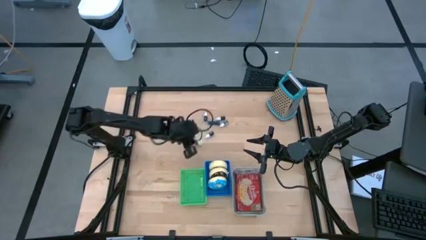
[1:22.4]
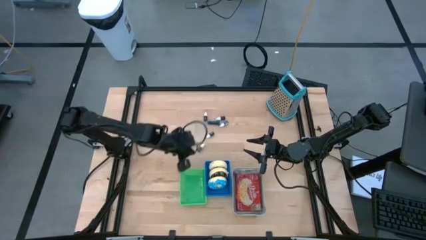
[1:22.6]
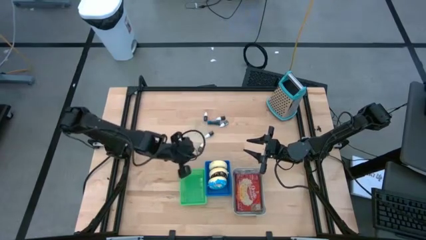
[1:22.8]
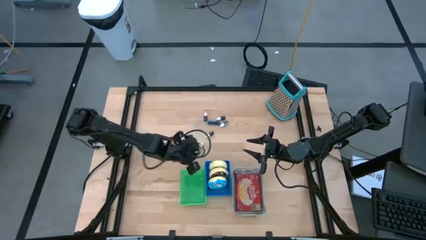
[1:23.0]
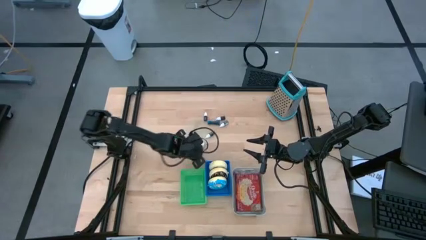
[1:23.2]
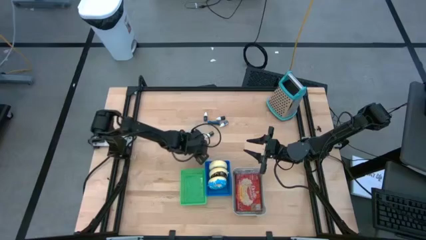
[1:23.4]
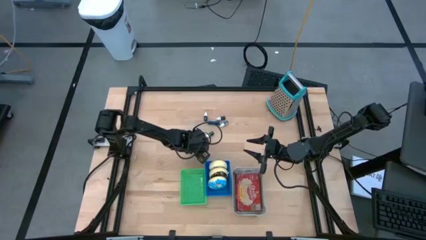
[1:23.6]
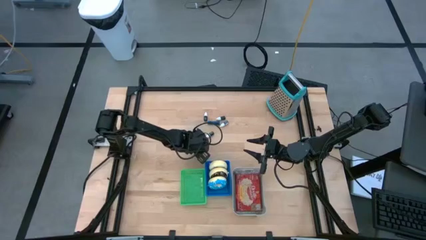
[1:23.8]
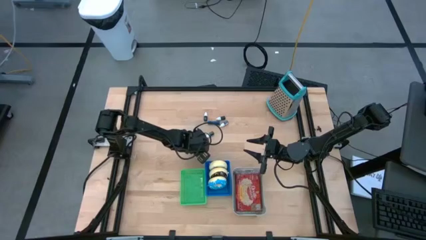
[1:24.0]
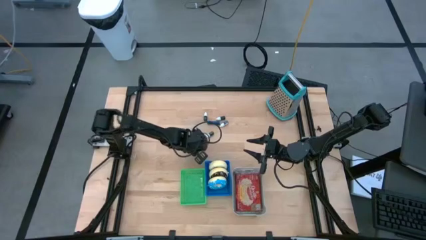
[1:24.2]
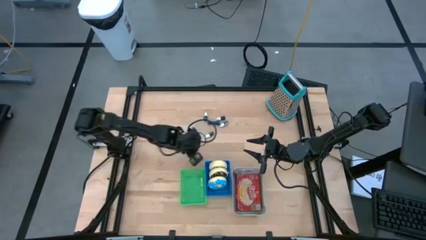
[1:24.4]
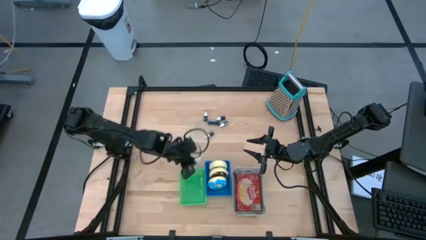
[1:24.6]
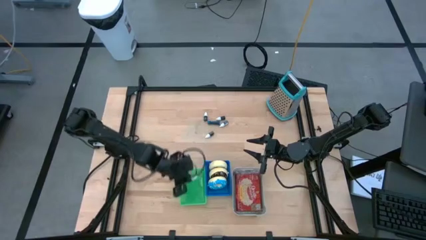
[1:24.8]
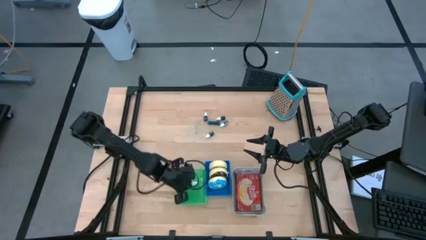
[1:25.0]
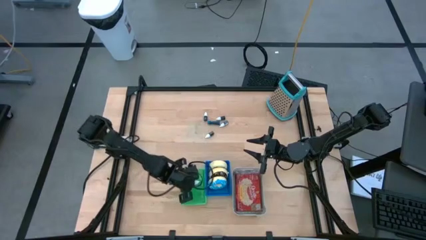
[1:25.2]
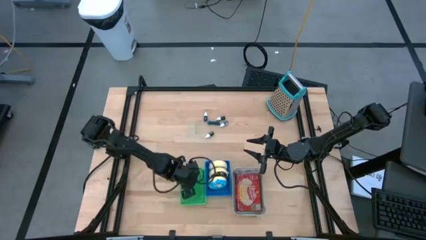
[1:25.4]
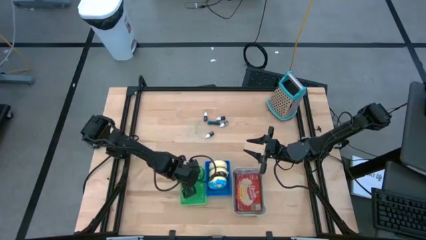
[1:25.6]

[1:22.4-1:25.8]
Put the brown food coloring bottle into the green bin

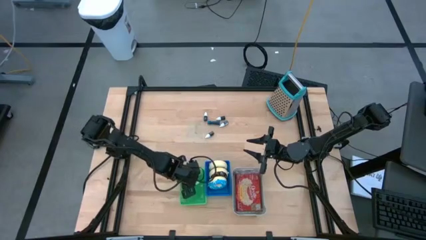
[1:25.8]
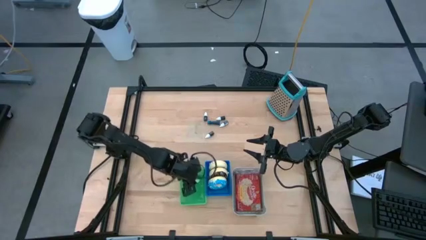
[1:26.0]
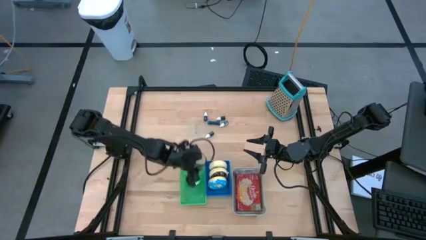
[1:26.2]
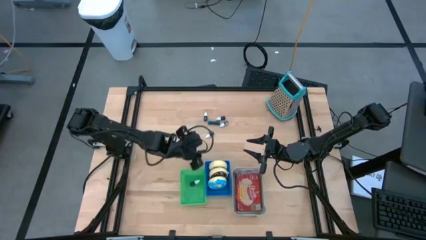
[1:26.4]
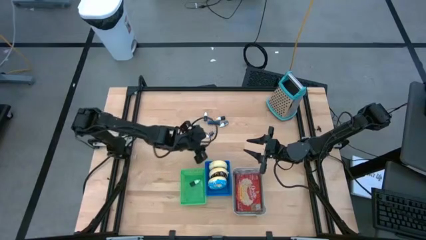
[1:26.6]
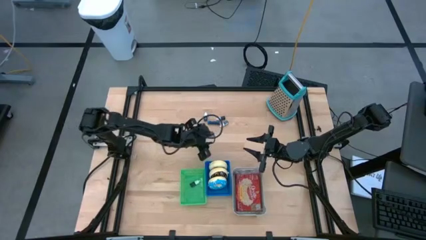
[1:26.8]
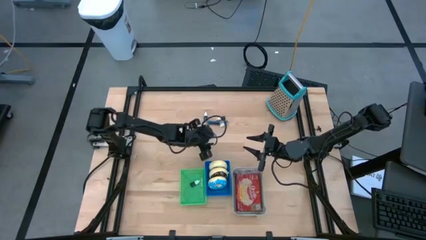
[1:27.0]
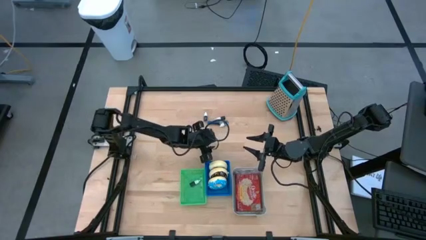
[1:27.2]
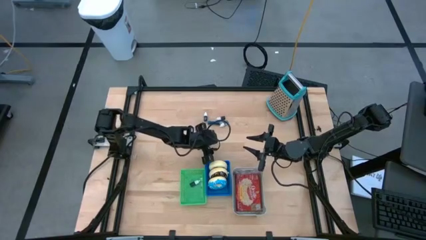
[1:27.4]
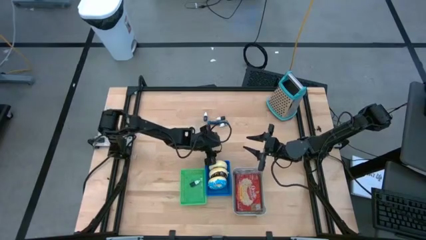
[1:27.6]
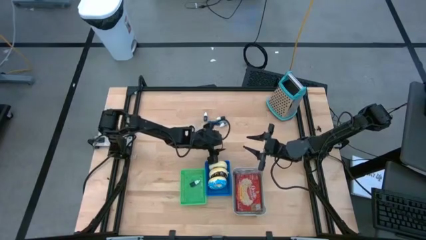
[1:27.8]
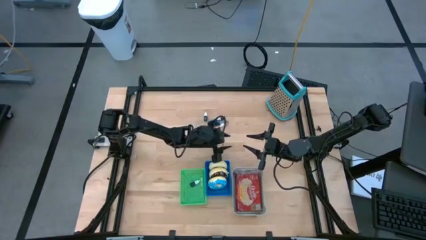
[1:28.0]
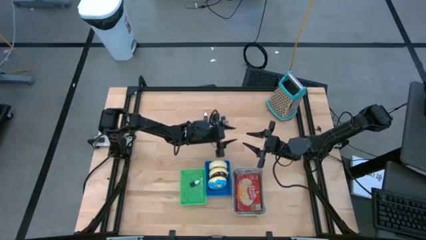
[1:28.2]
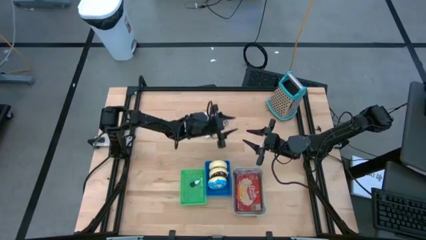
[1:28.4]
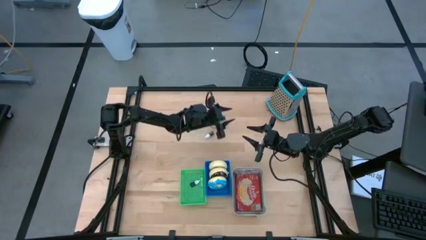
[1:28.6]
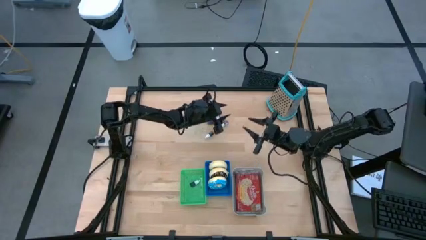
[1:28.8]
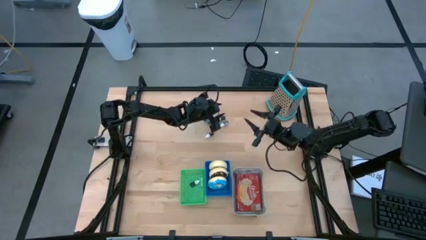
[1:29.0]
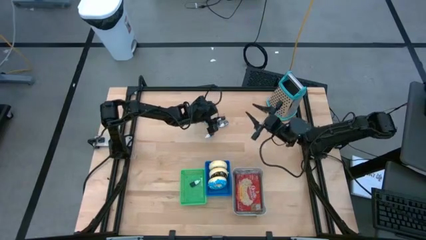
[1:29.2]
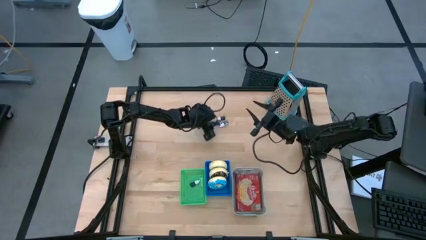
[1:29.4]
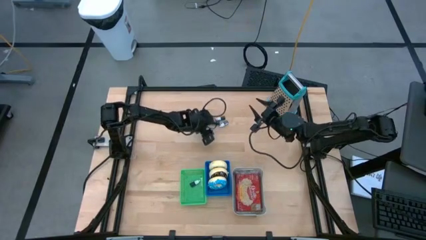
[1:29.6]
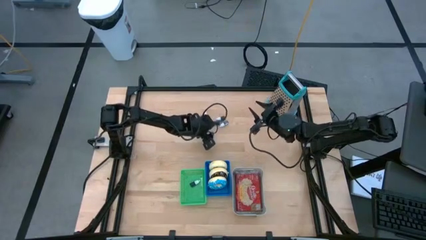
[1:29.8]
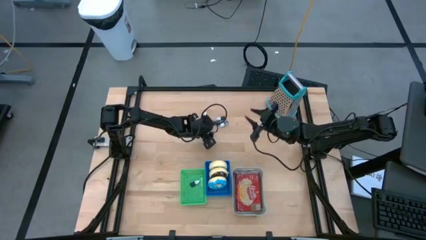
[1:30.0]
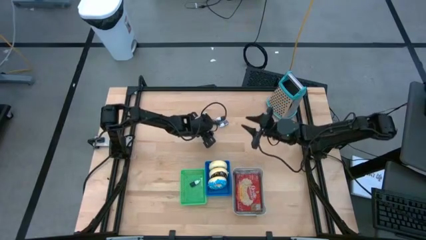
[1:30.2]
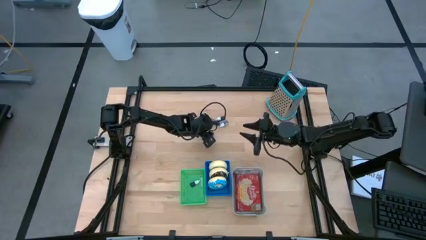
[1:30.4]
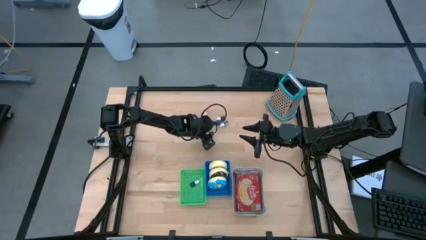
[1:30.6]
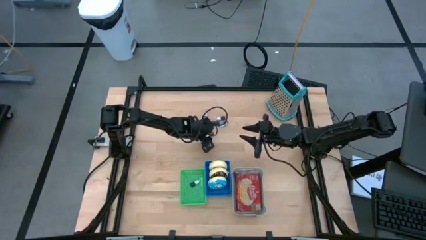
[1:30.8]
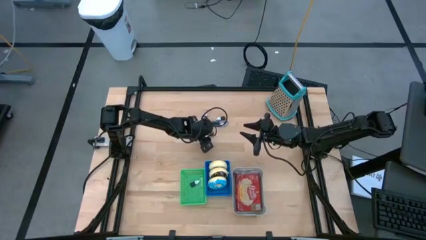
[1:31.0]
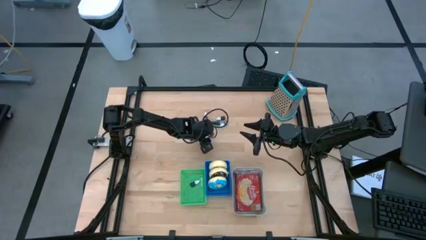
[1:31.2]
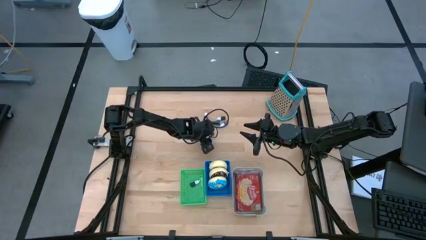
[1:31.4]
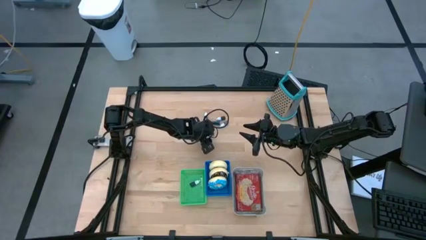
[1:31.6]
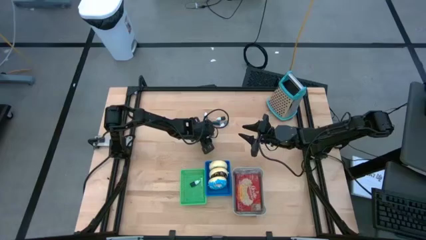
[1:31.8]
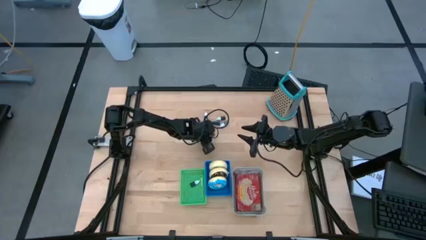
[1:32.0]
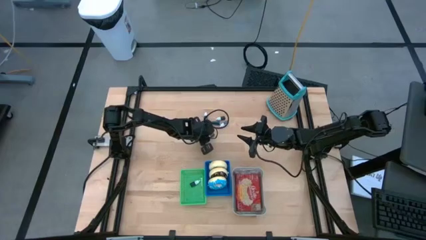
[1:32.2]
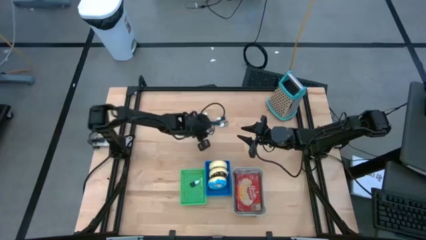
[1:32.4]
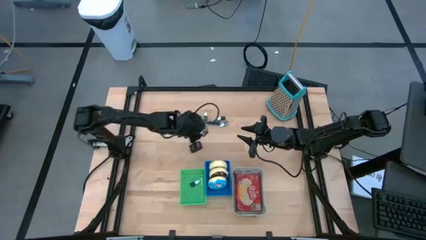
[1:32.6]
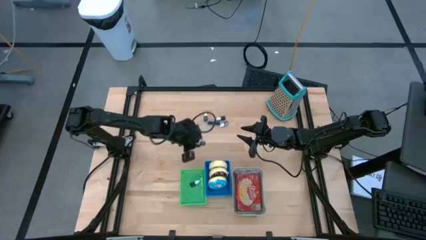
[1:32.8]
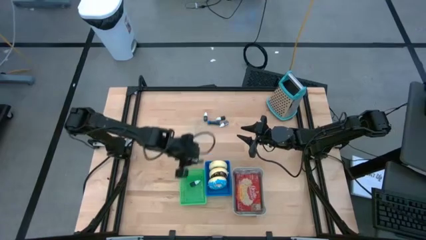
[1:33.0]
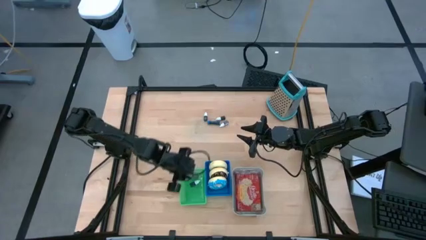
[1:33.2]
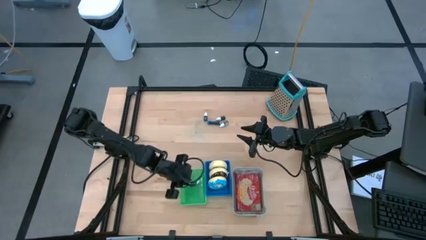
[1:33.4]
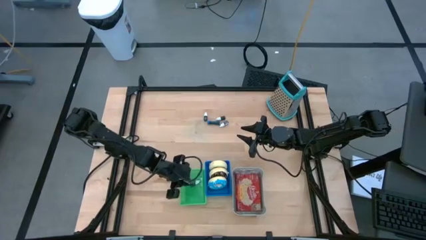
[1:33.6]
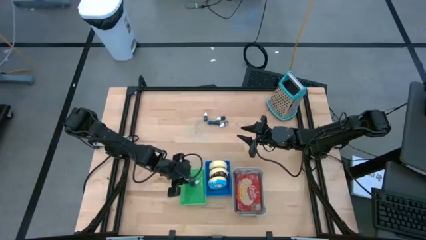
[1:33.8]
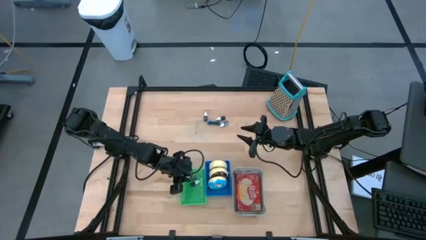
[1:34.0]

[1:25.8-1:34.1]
Put the bottom dark green food coloring bottle into the green bin

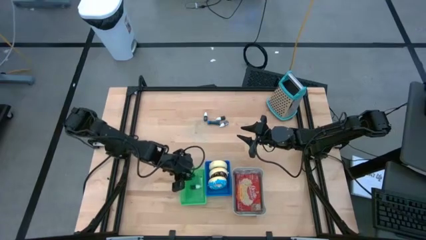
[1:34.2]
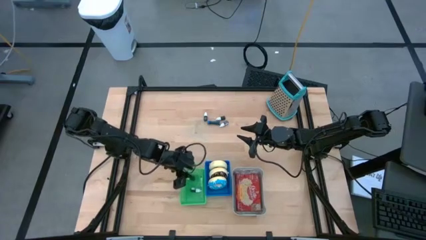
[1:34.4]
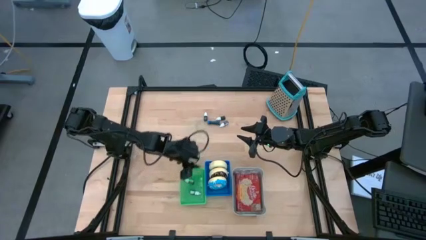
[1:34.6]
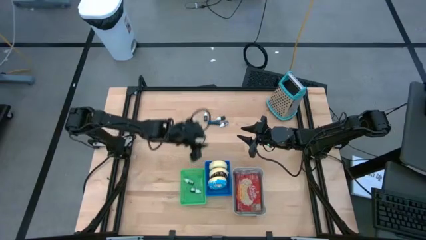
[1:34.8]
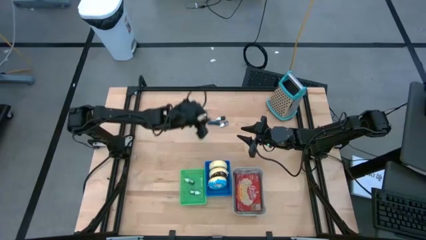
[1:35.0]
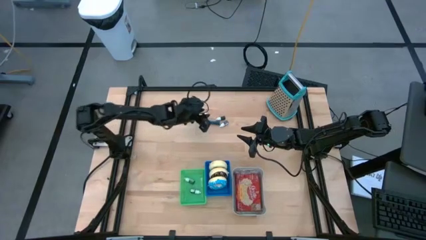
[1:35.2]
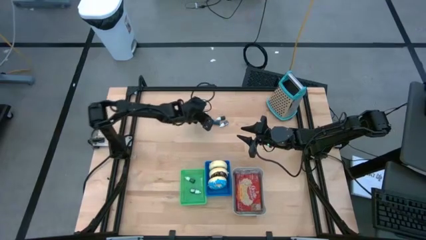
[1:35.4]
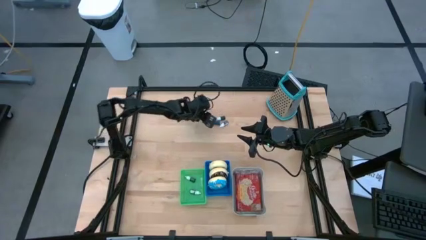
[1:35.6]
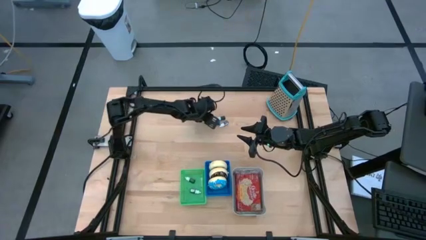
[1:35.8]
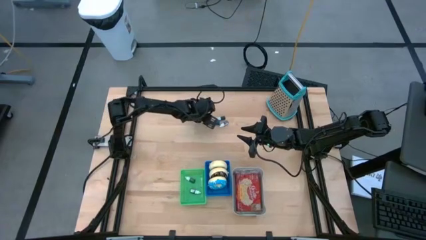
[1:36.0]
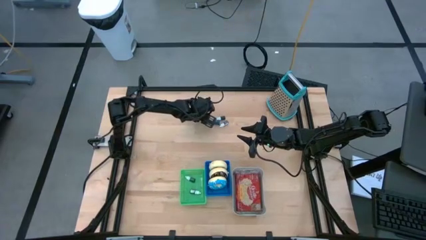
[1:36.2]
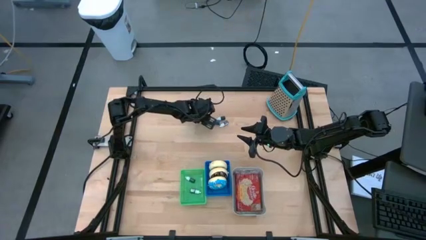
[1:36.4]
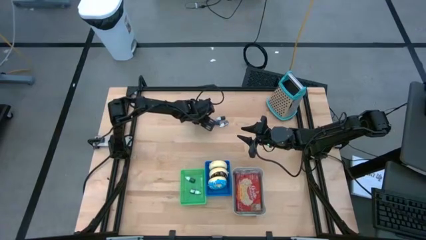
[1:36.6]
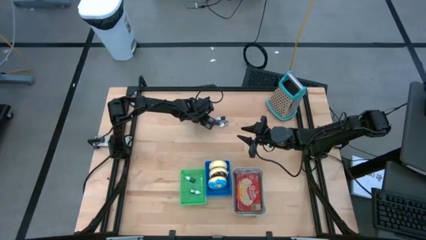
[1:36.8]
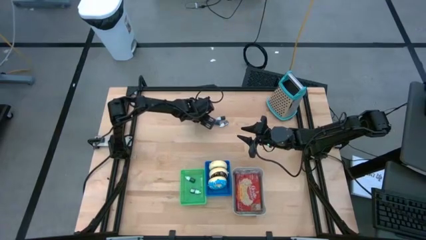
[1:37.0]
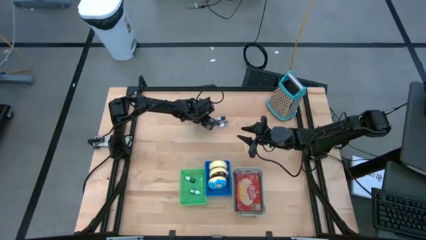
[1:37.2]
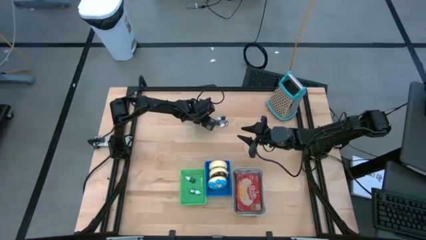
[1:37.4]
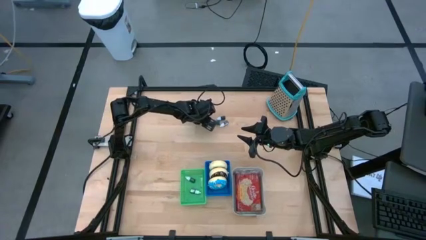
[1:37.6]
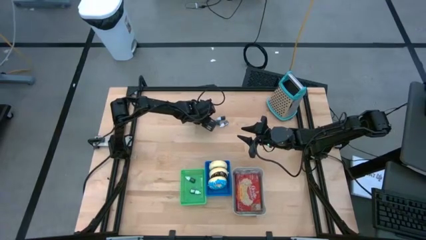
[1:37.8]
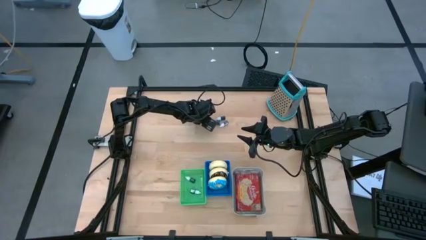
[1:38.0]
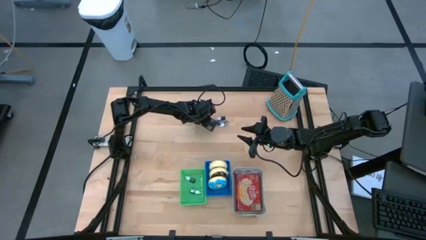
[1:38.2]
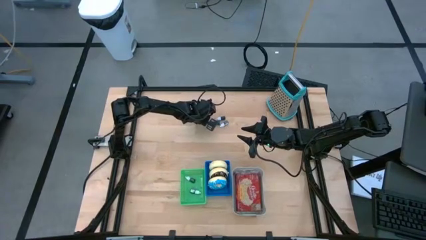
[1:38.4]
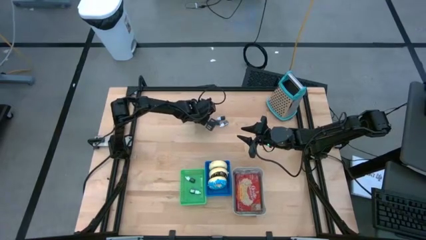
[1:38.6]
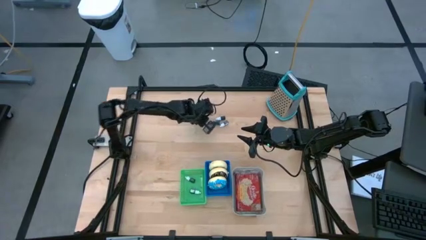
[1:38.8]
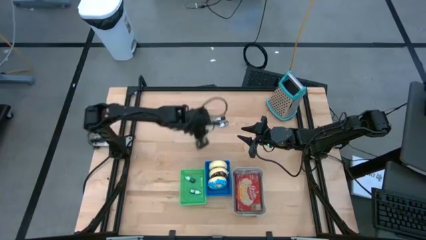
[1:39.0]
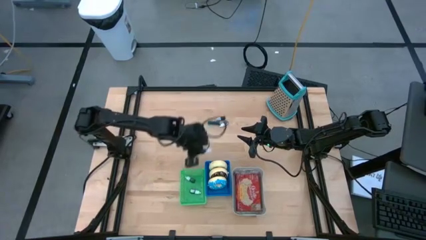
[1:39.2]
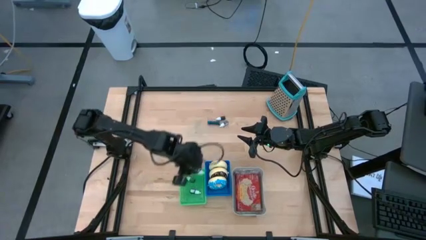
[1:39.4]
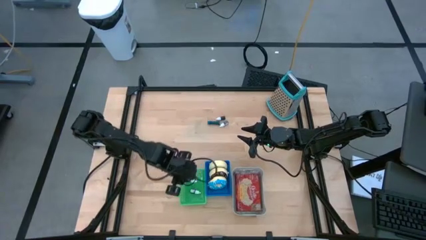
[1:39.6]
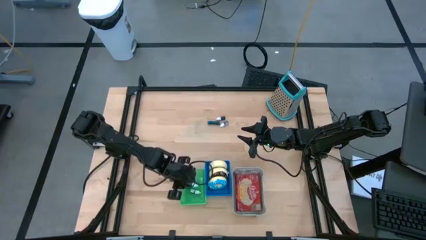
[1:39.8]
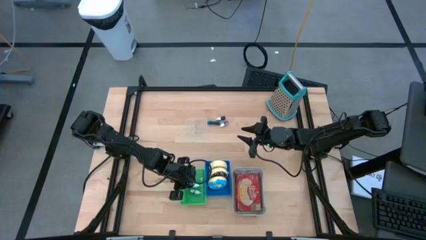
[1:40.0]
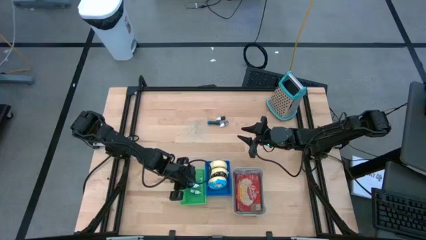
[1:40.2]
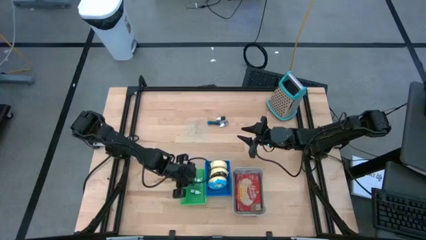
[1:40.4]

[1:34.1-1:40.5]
Put the left dark blue food coloring bottle into the green bin
